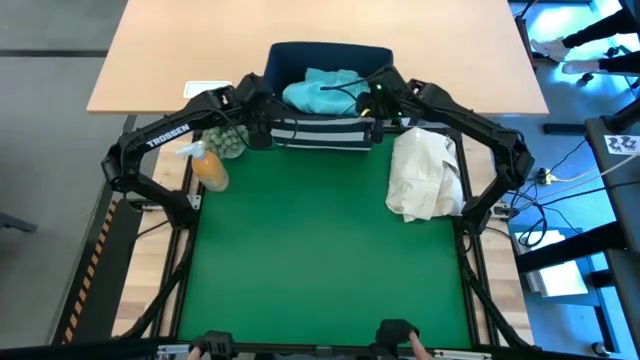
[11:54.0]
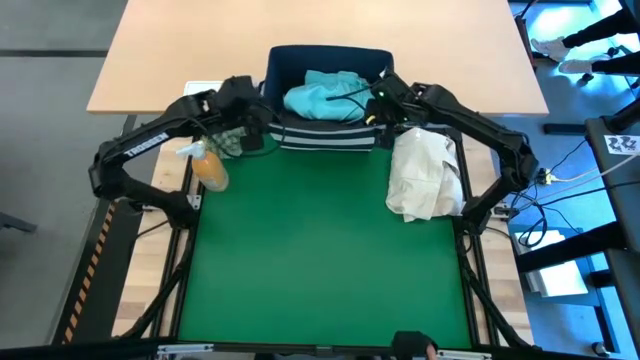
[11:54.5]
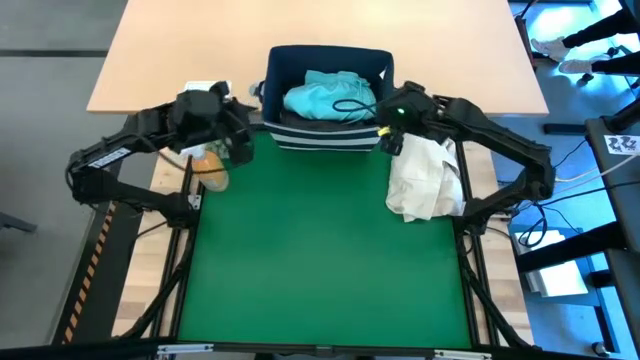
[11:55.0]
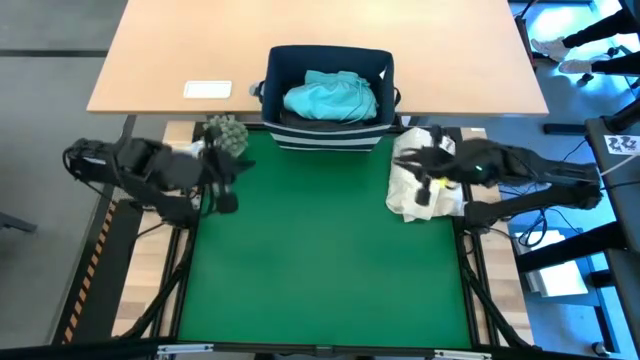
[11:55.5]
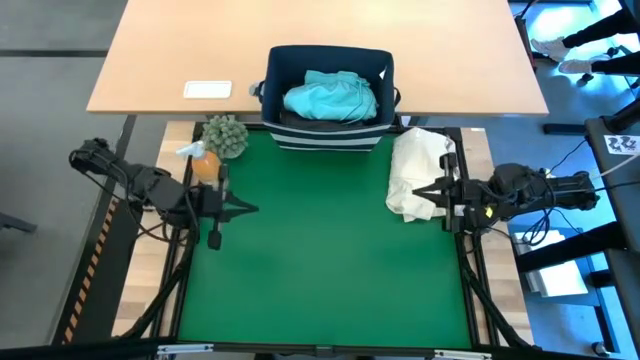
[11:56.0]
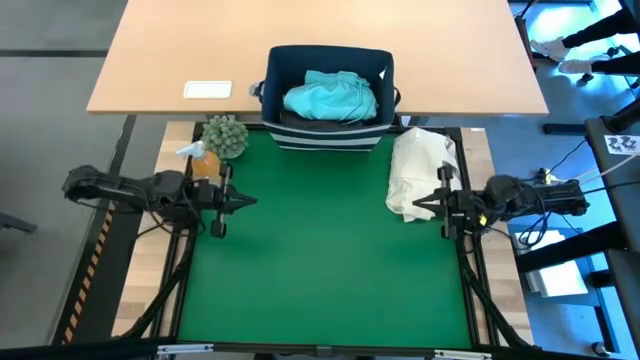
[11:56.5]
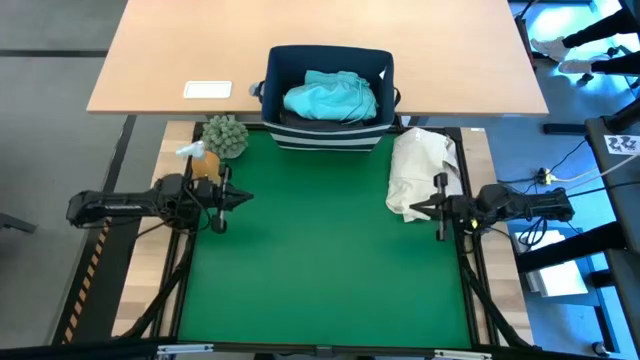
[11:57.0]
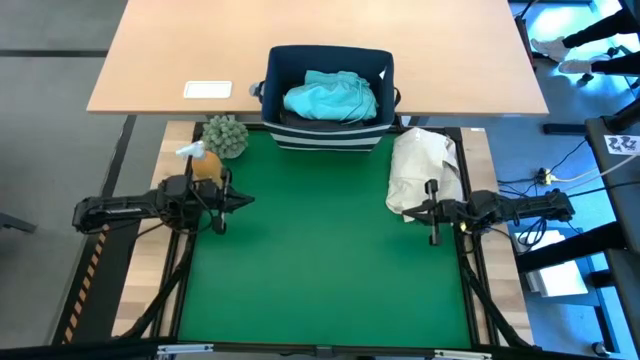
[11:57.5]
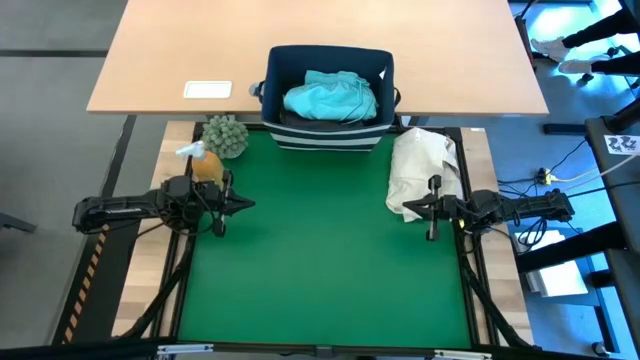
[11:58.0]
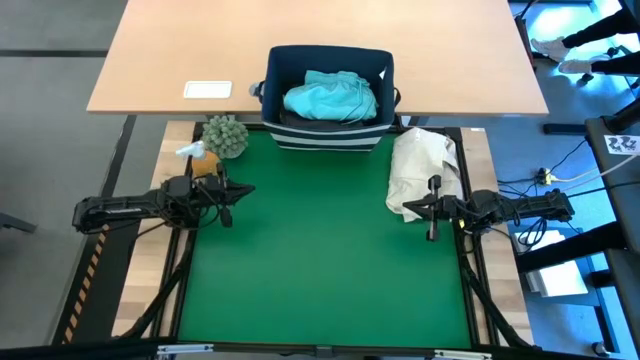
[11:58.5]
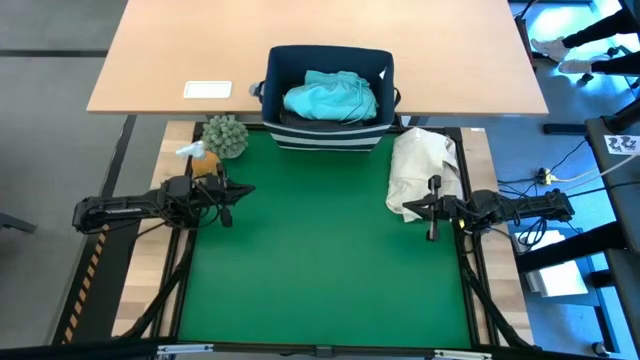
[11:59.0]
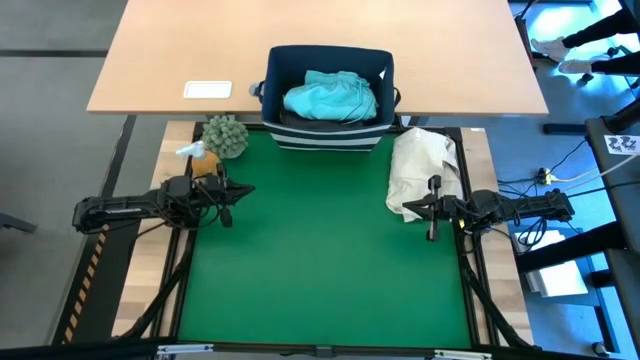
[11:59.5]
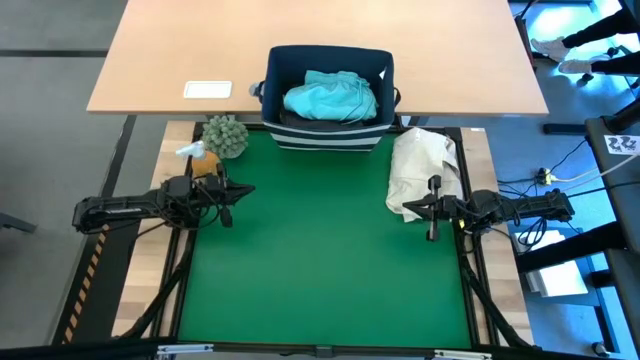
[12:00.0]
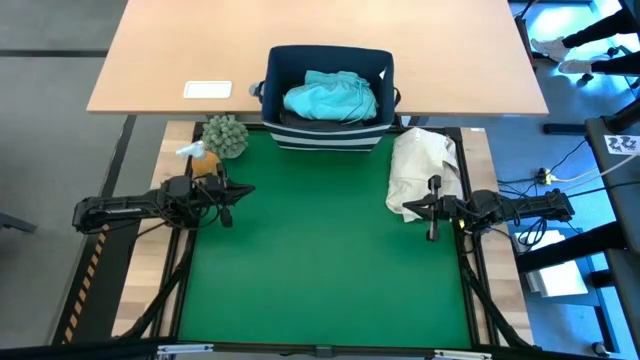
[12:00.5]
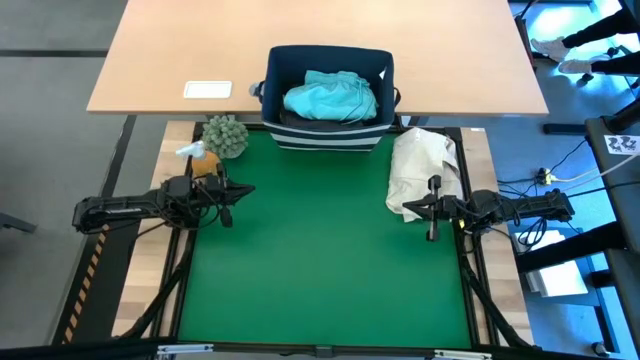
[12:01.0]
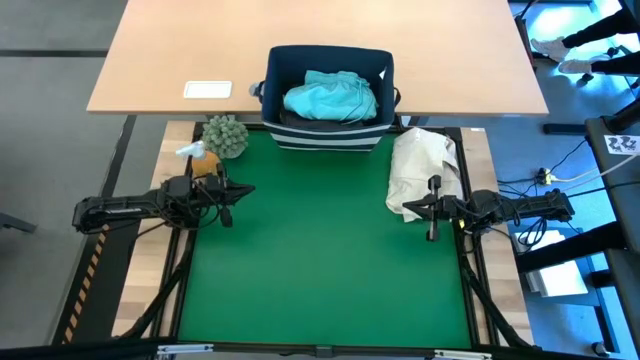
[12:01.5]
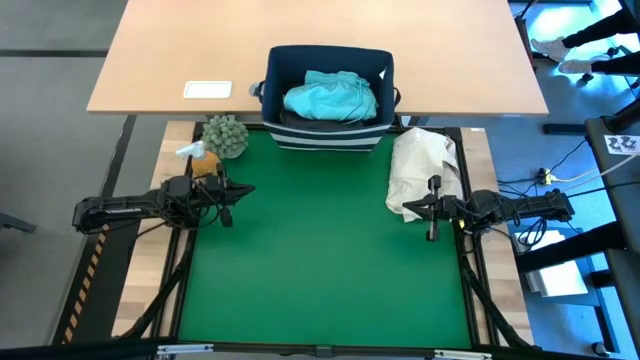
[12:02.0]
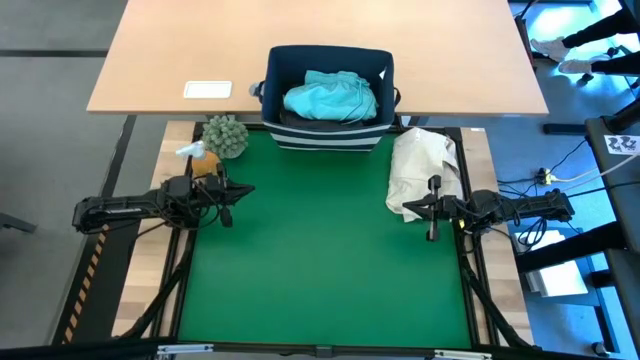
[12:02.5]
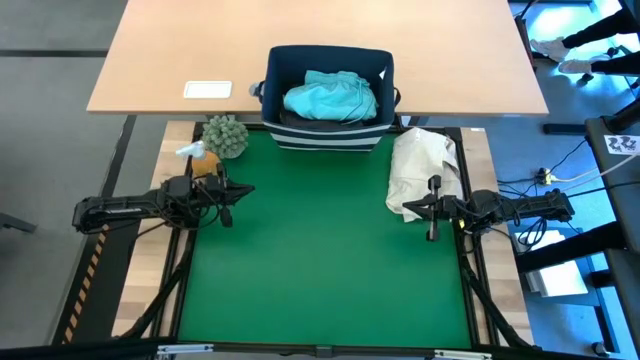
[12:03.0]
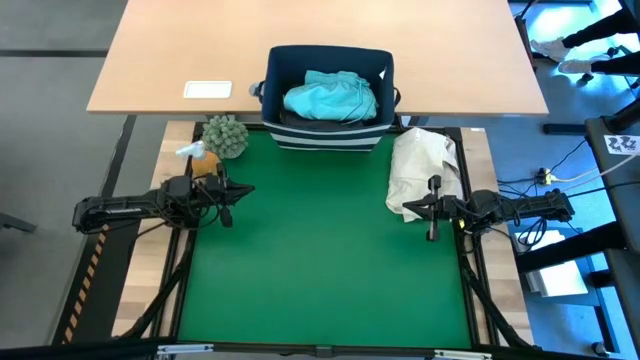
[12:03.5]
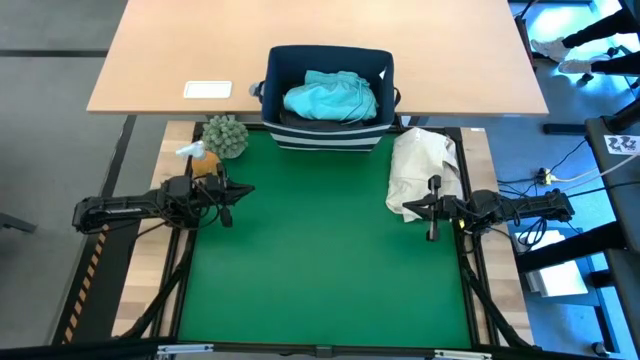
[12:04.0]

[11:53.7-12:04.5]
Task: Fold laundry
Return to Home Position
